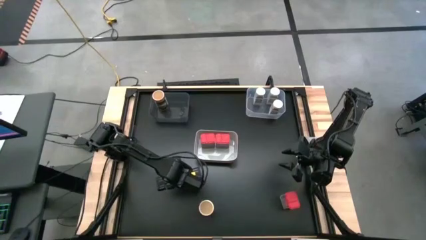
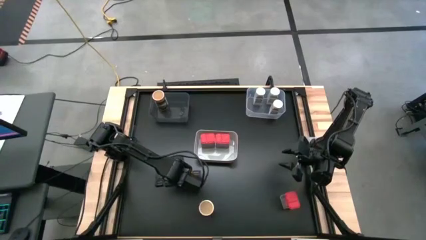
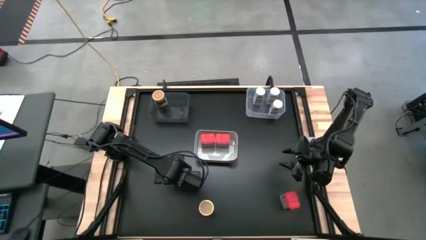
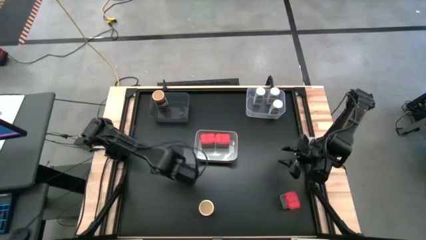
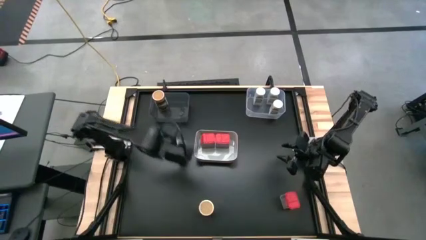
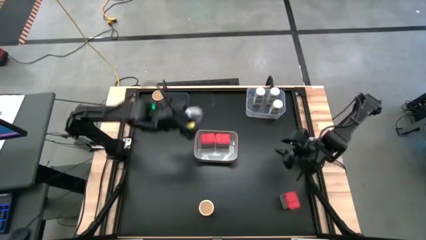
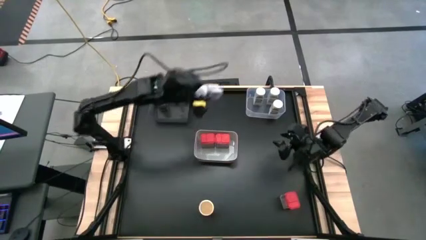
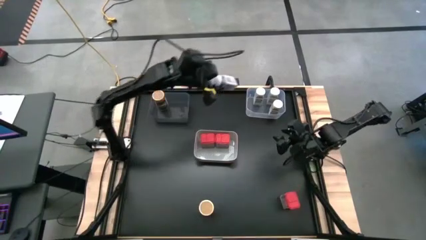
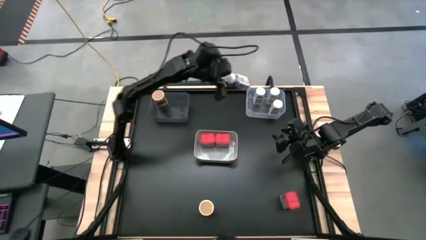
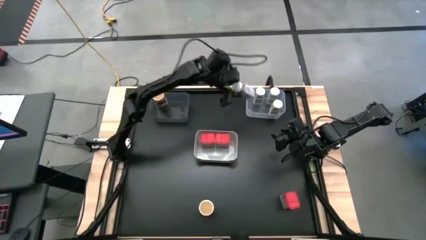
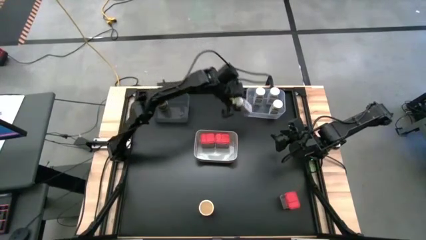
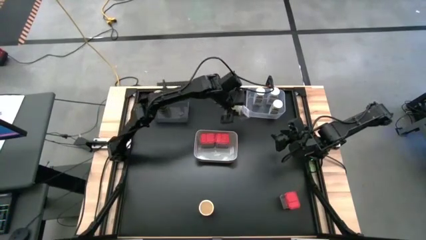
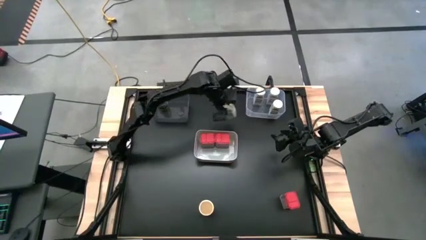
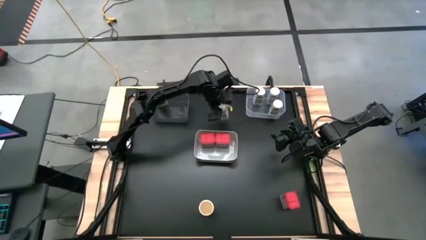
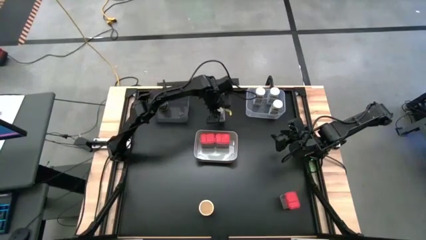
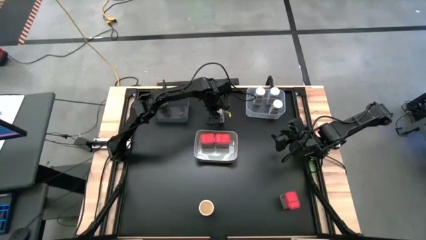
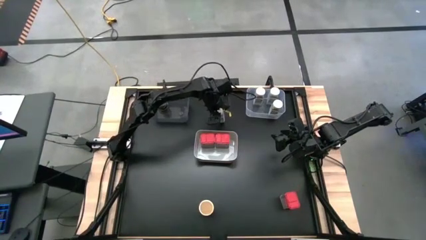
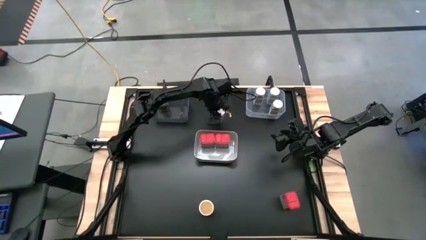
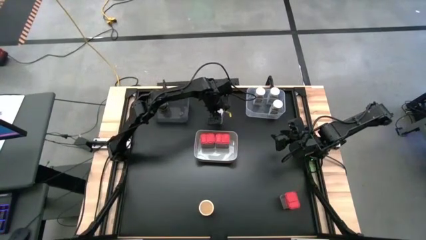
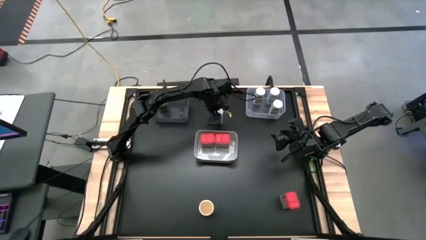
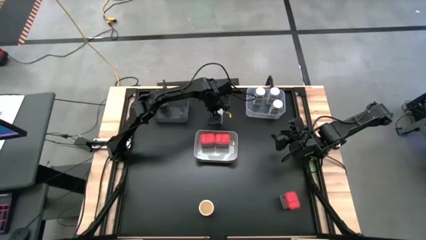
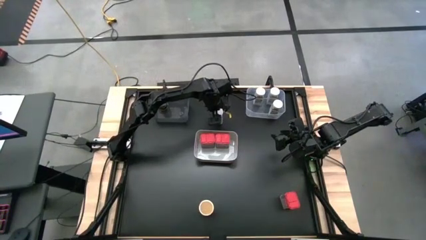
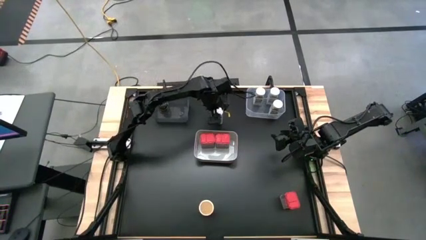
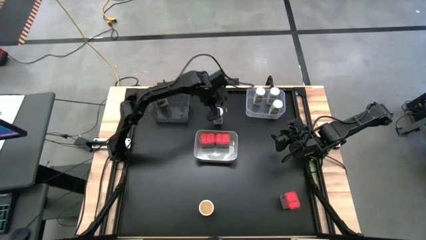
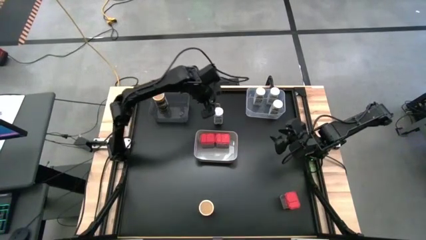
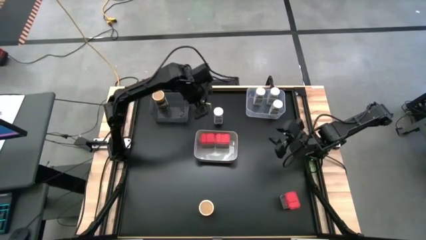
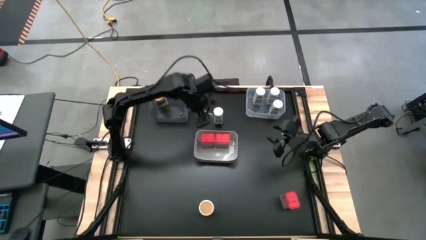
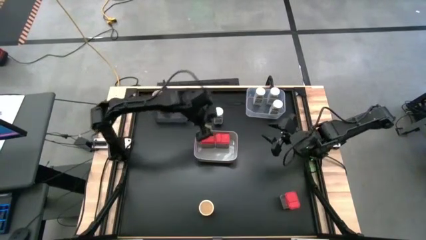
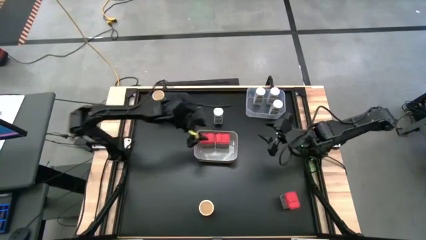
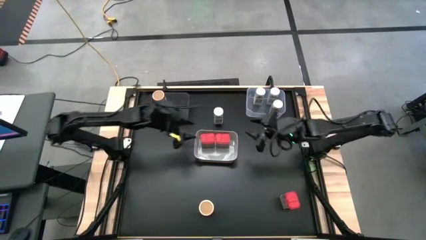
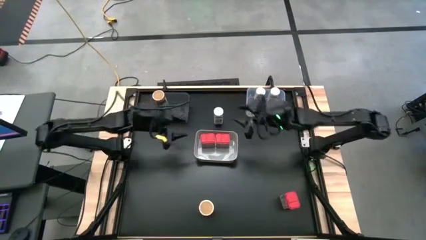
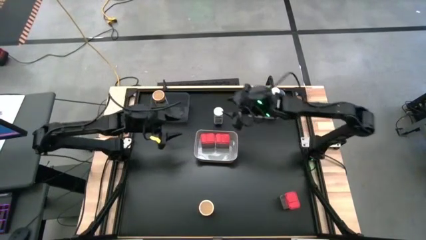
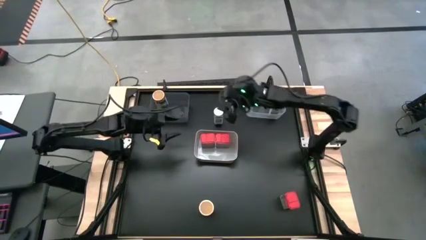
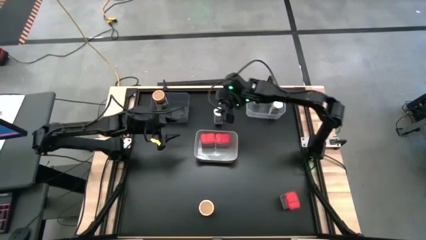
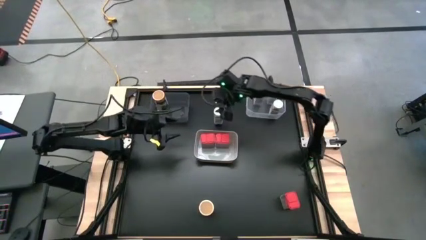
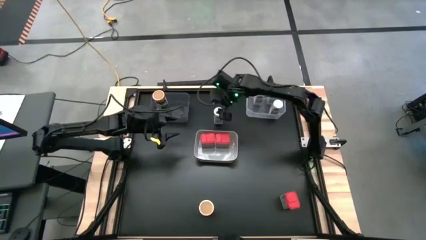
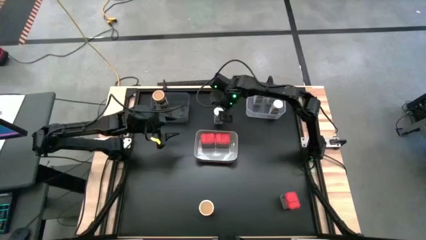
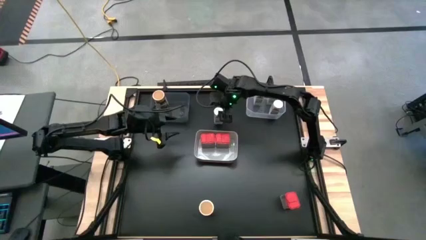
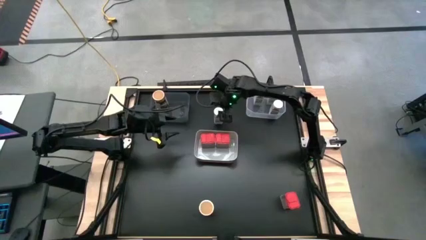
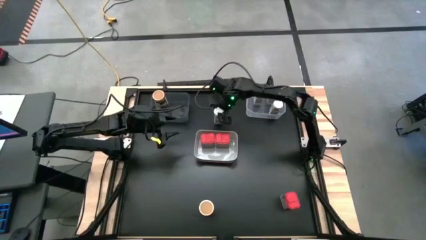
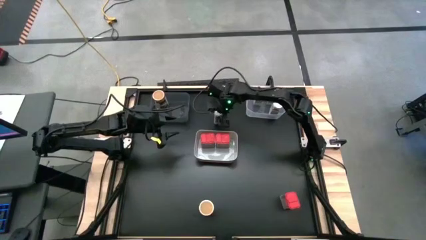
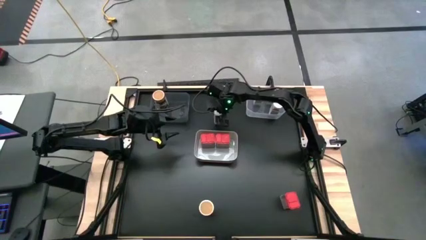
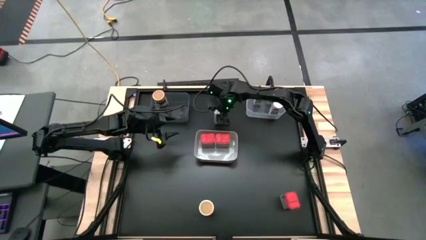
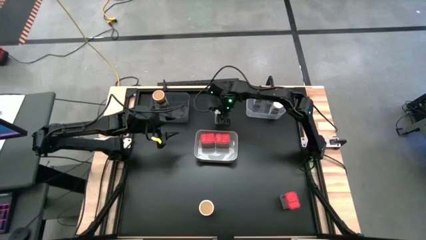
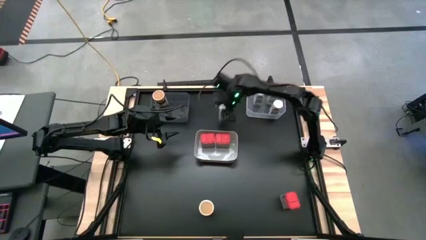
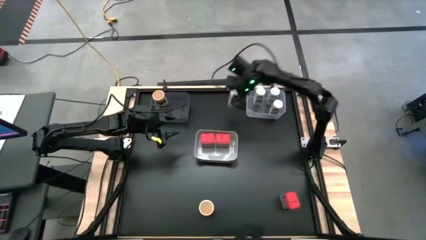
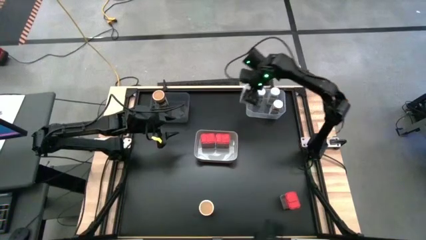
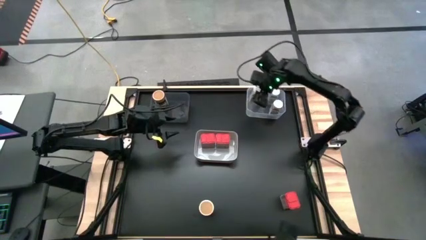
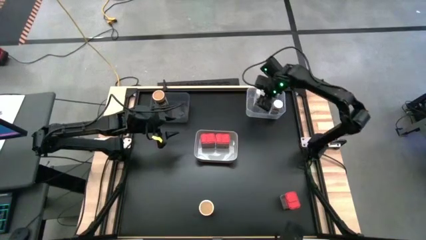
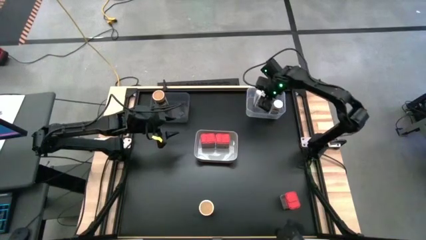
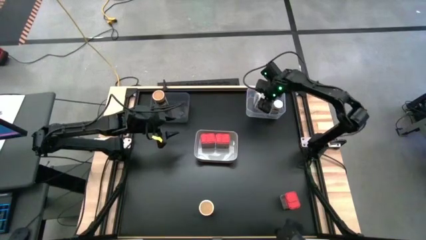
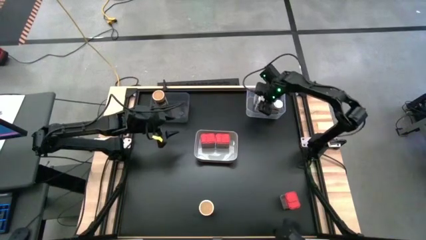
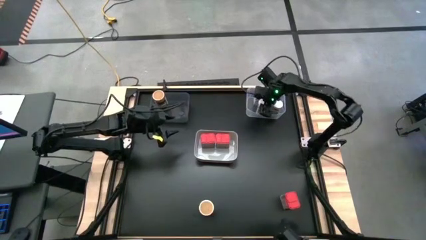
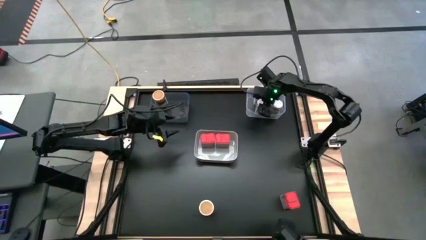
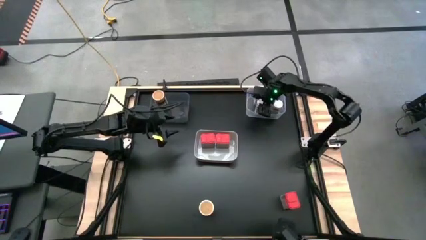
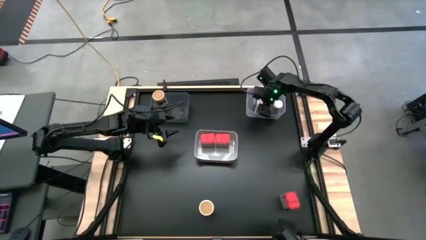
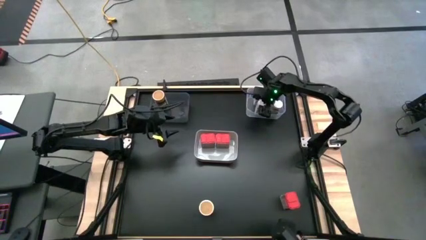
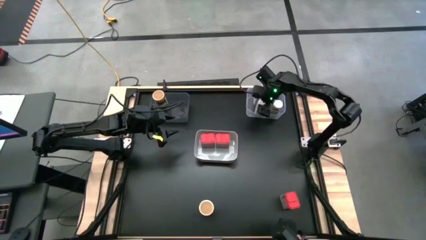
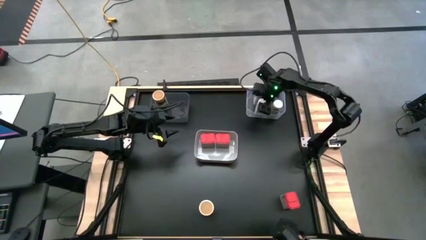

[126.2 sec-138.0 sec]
Task: Sort spices by type
Put the white seasoning bottle into the transparent bin

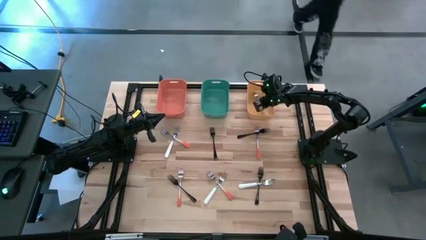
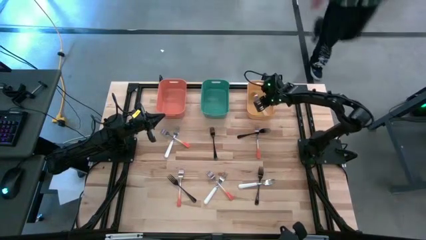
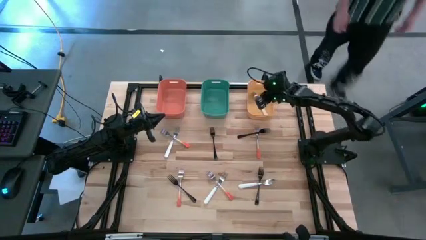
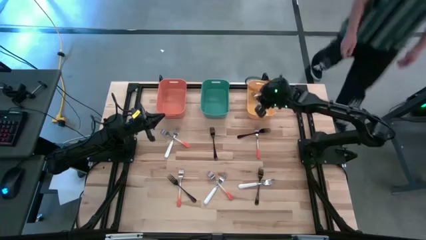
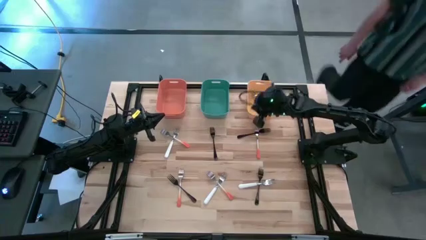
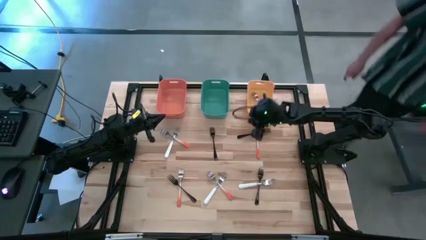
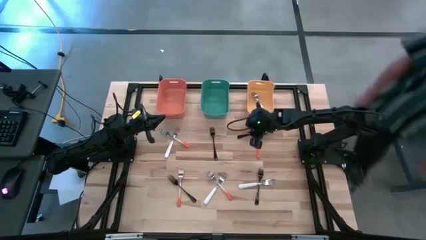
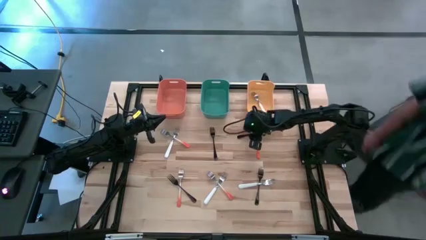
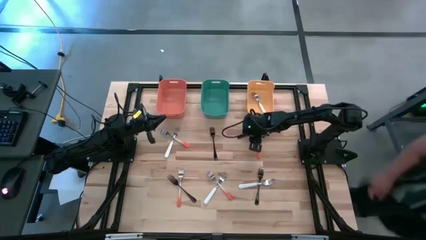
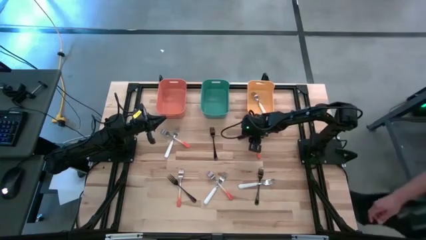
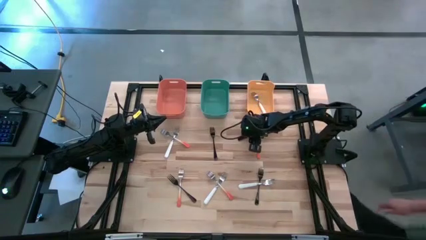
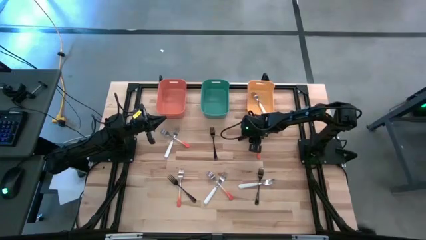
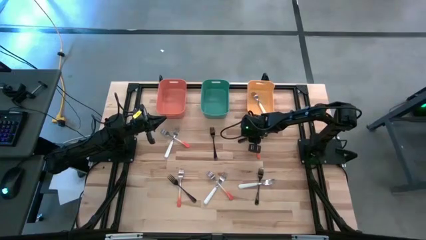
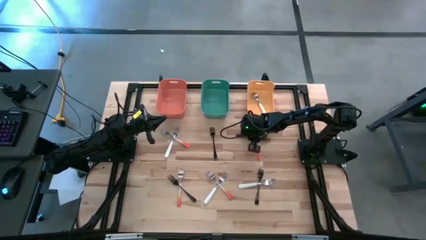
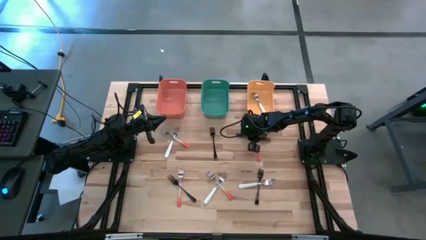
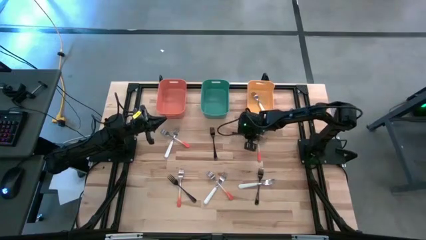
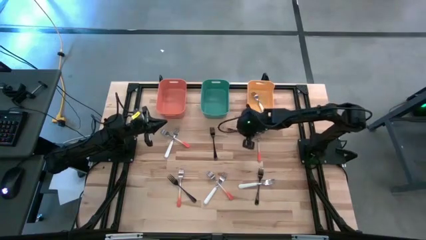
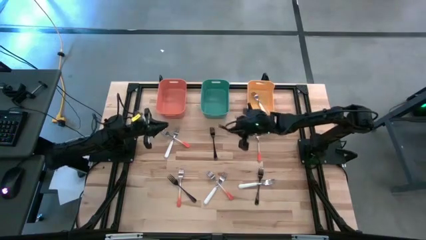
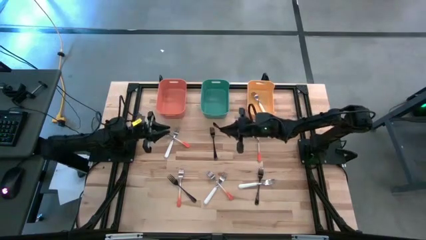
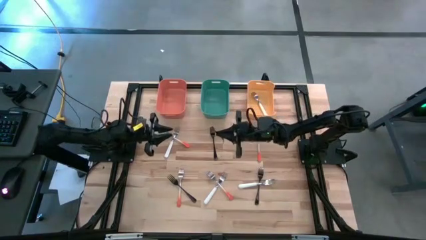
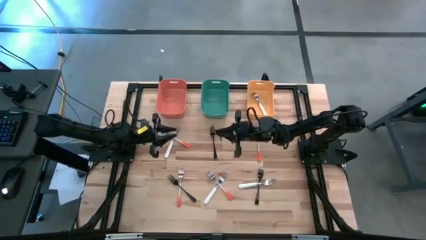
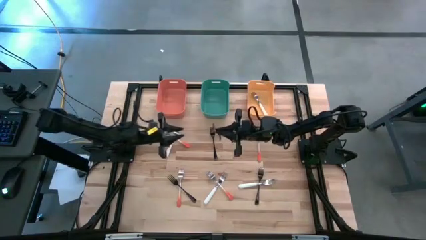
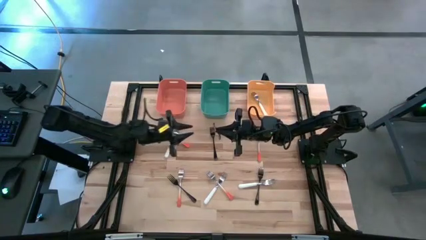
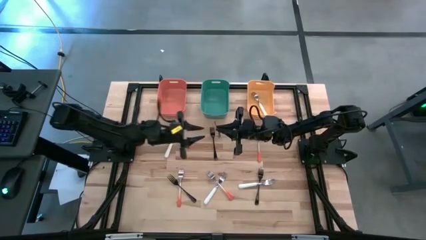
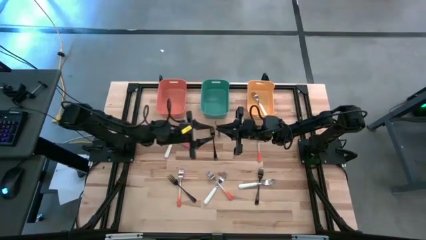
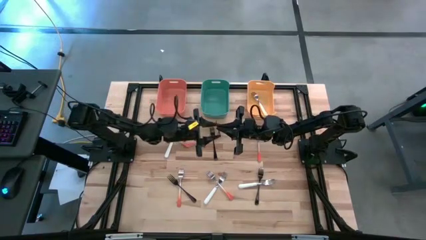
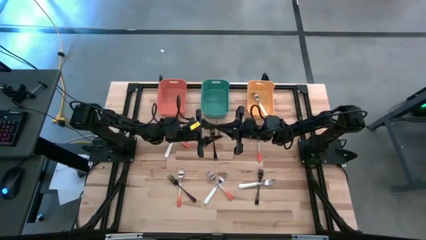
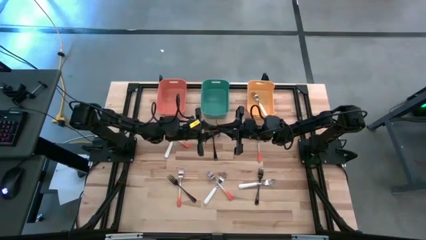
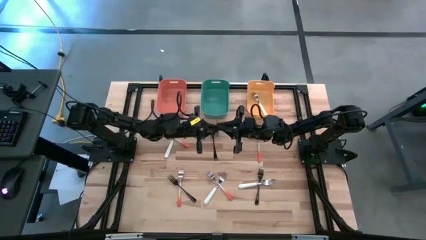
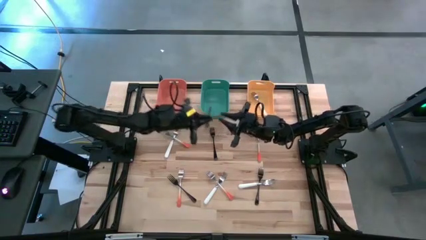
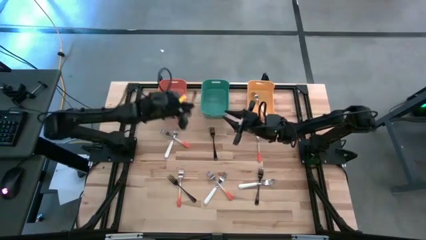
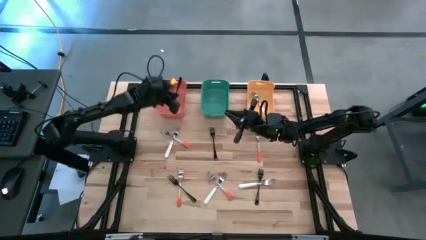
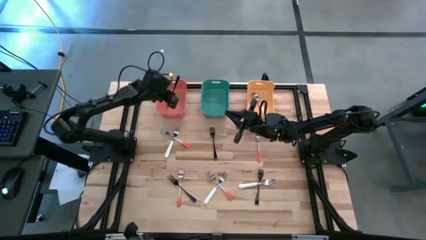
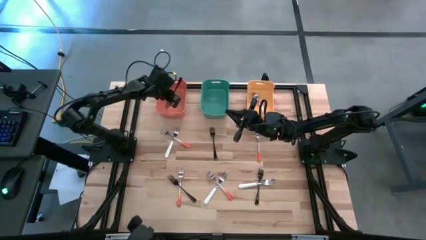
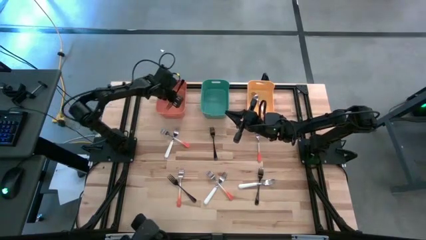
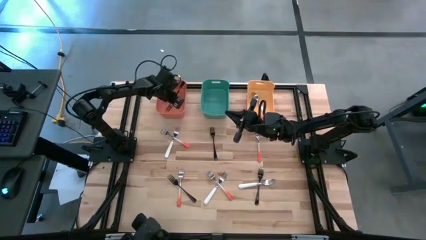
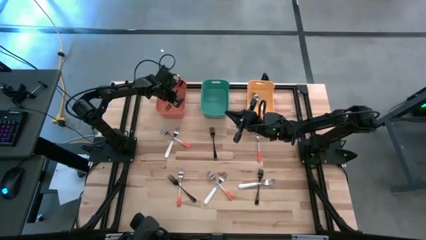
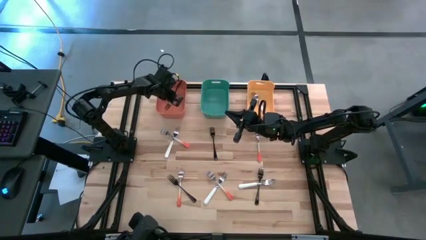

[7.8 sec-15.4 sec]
Task: Sort silverware by color (type)
Put the top right black fork into the orange bin
